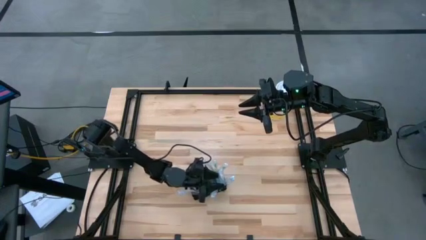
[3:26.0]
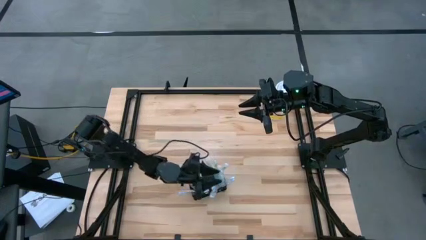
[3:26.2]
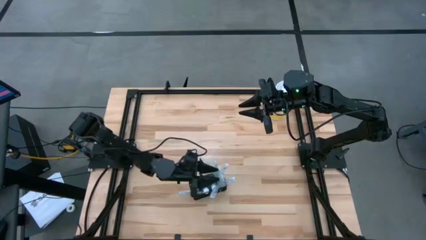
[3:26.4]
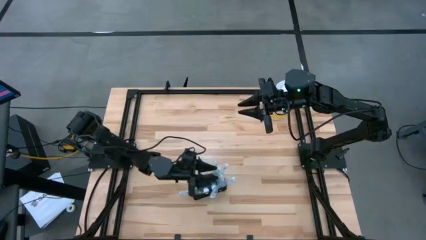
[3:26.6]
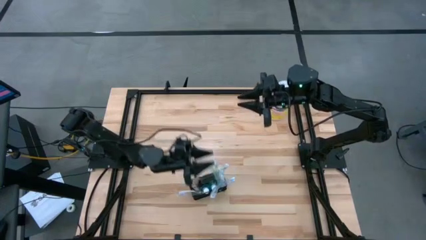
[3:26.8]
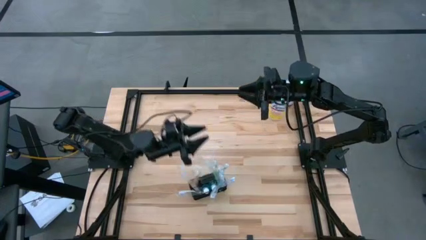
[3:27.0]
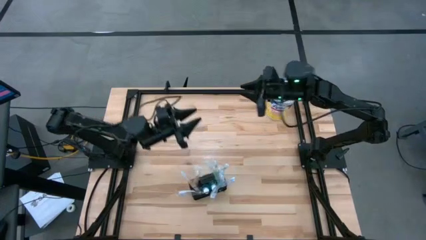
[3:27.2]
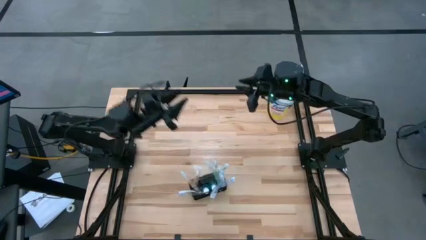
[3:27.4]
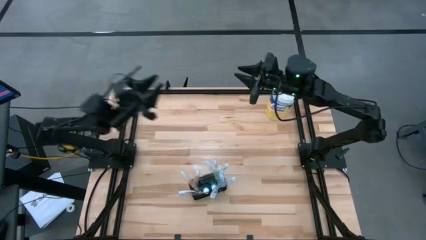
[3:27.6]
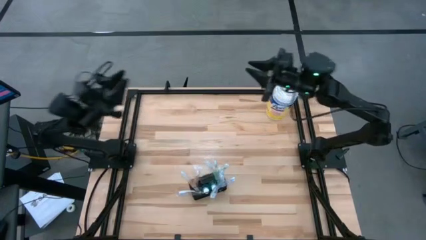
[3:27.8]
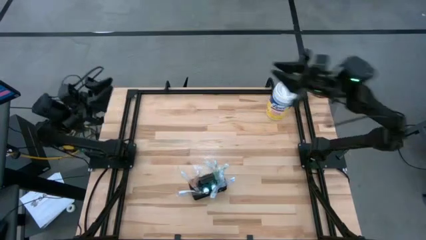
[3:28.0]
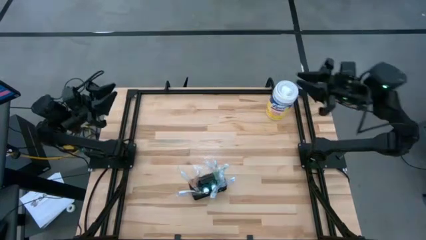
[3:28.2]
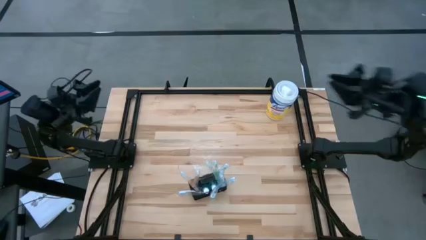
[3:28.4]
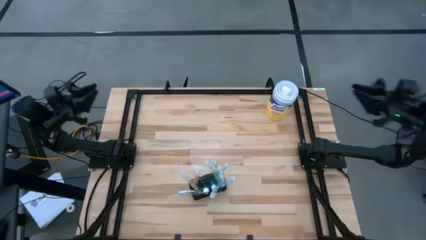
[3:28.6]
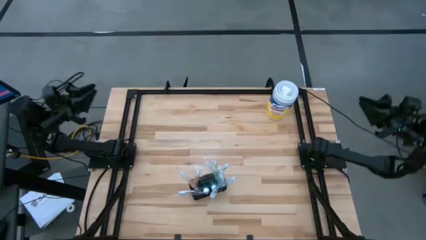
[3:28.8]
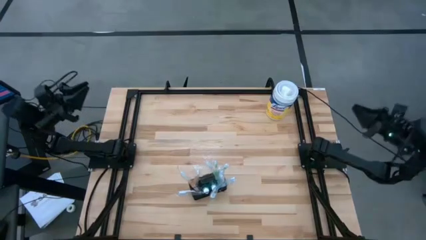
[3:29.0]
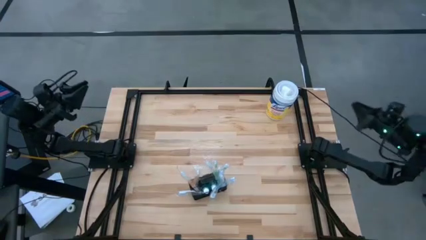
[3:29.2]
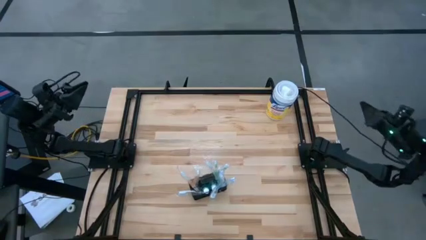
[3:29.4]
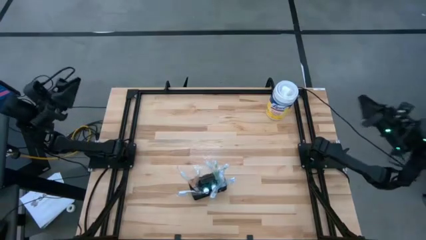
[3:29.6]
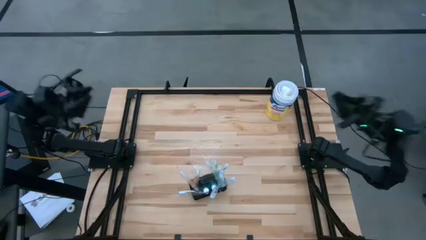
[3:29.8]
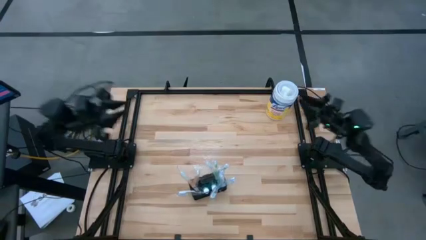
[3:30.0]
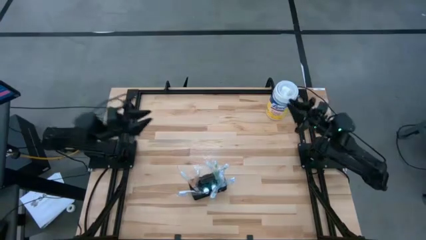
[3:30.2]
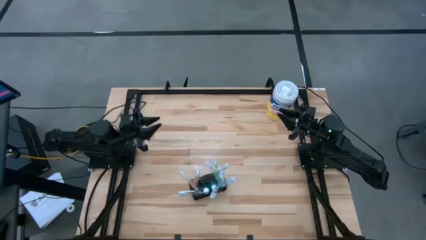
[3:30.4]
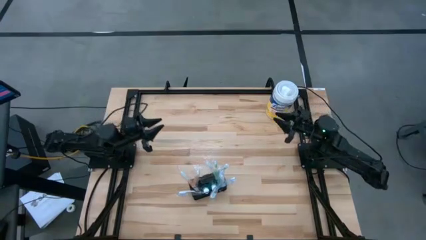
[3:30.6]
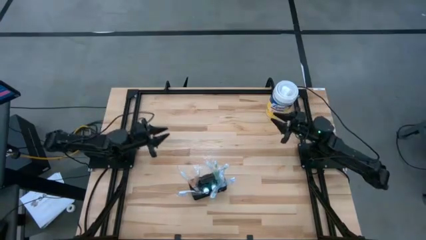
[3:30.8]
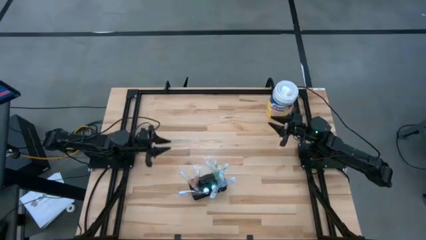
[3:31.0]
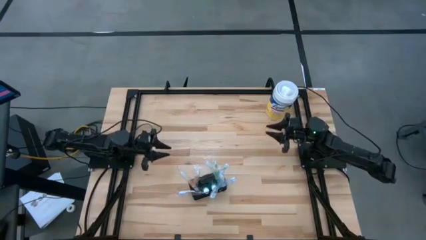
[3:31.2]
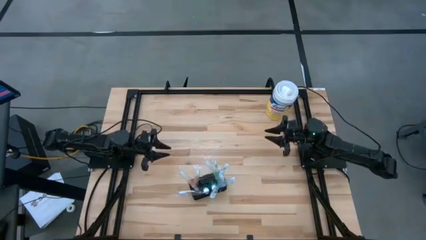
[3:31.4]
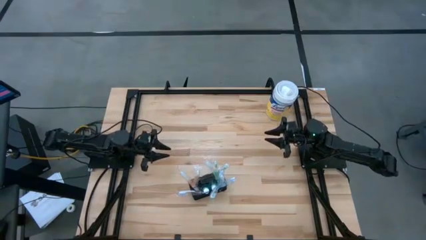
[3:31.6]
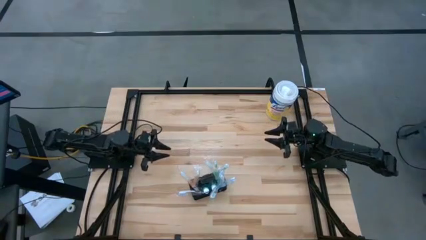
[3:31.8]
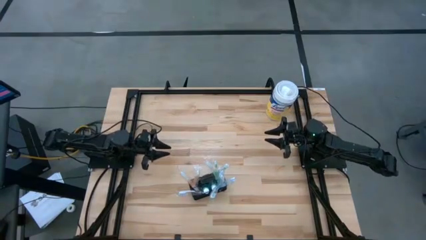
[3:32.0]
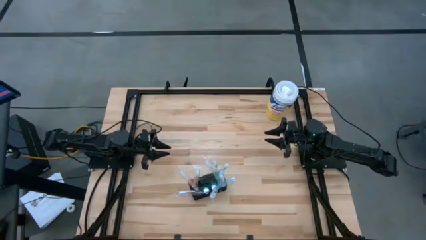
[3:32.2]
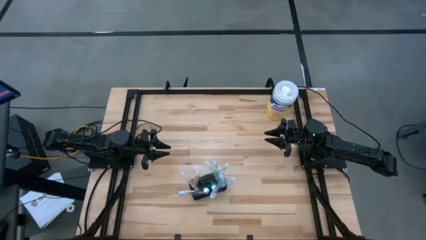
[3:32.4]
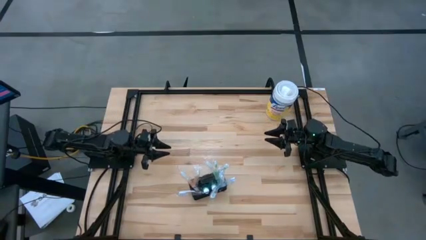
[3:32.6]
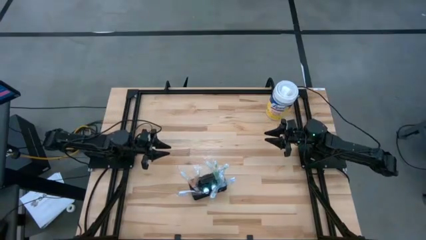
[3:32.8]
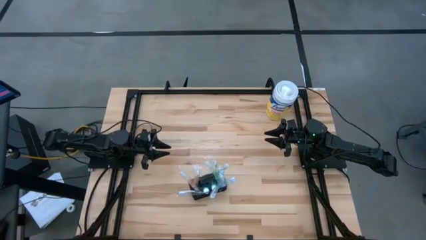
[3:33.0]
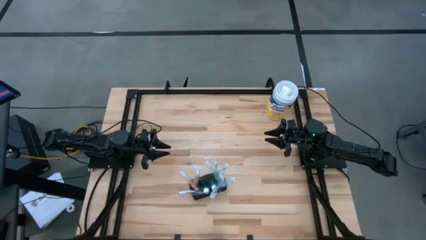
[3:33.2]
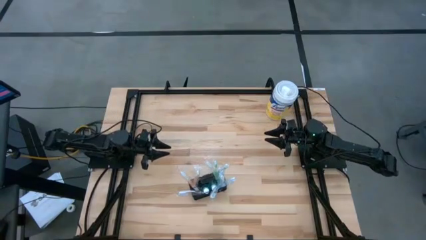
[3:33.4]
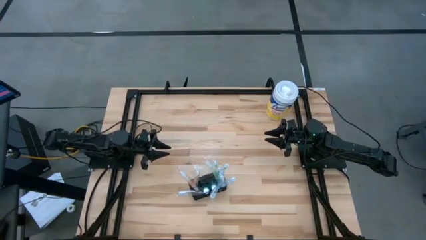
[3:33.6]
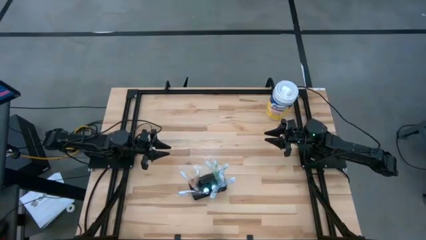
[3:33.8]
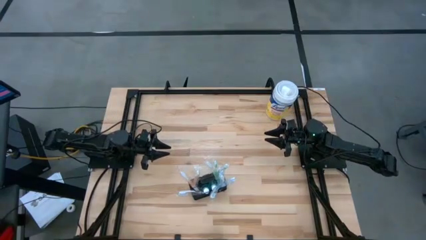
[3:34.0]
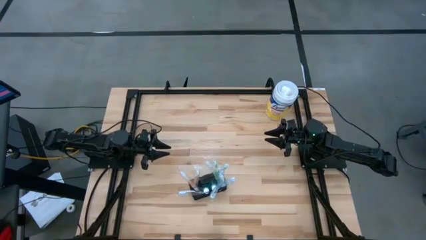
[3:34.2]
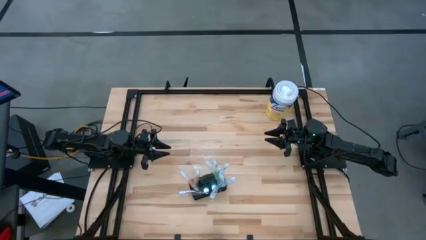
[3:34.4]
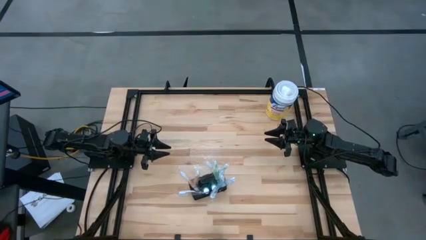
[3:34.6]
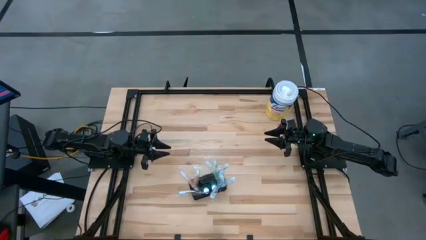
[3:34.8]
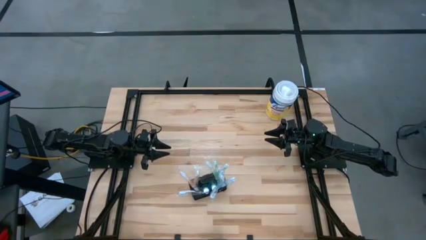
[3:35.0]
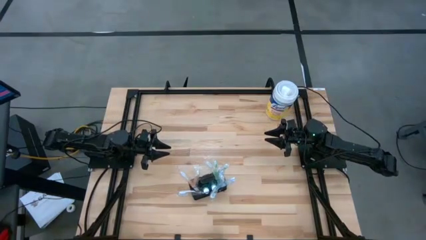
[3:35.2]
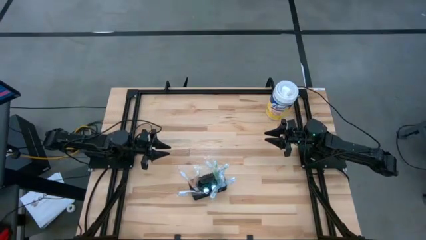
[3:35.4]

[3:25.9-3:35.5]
Task: Pick & Place toothbrushing station
Return to Home Position

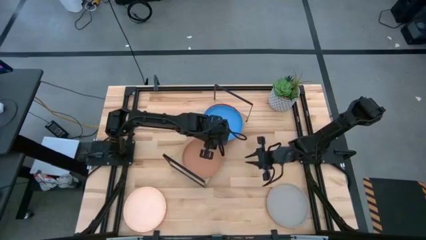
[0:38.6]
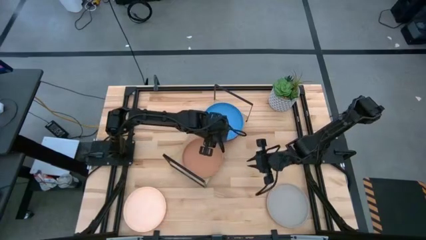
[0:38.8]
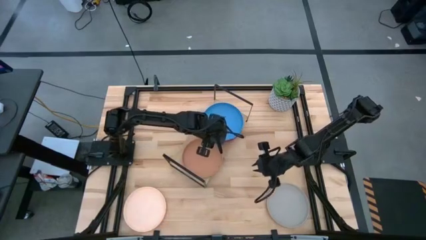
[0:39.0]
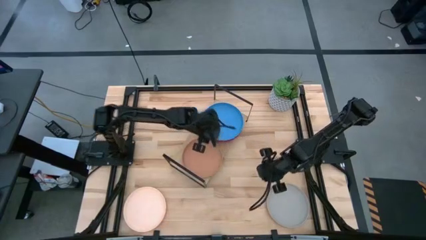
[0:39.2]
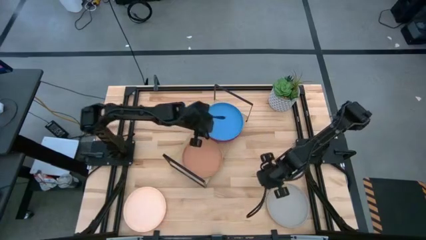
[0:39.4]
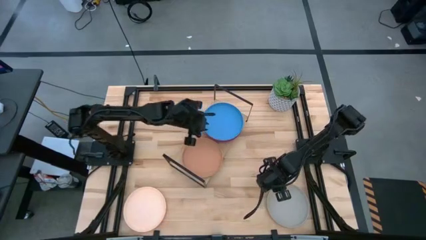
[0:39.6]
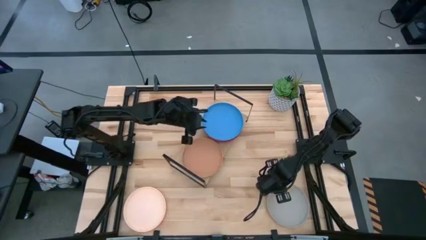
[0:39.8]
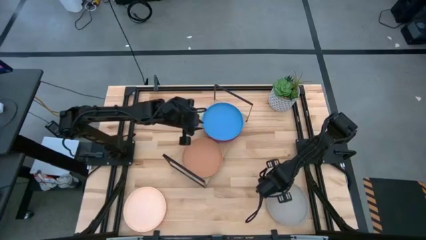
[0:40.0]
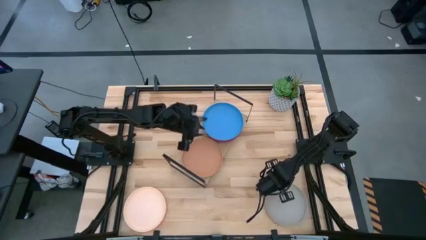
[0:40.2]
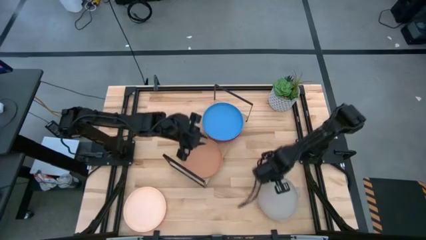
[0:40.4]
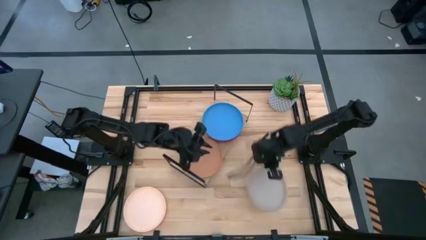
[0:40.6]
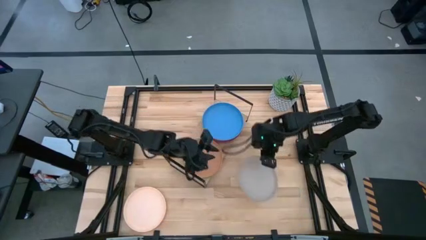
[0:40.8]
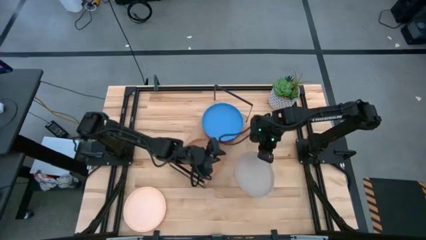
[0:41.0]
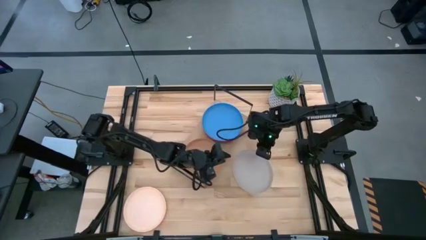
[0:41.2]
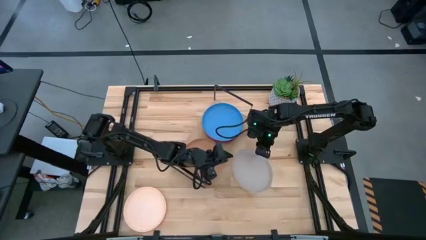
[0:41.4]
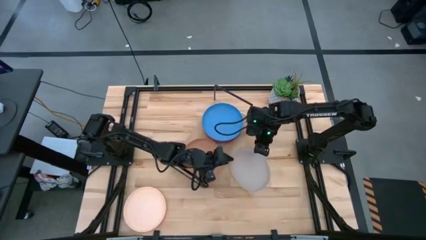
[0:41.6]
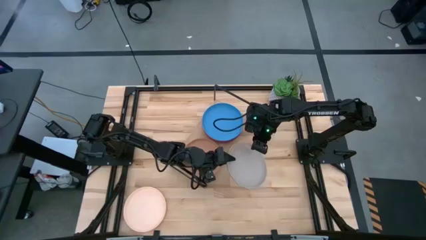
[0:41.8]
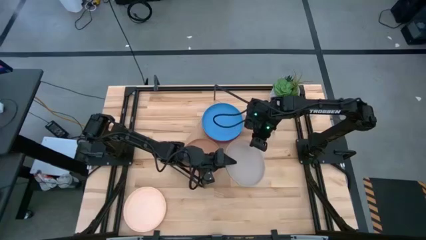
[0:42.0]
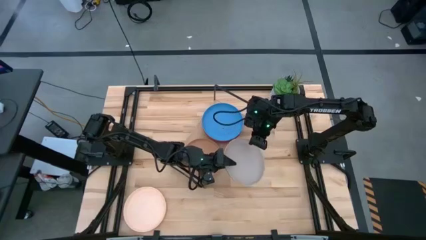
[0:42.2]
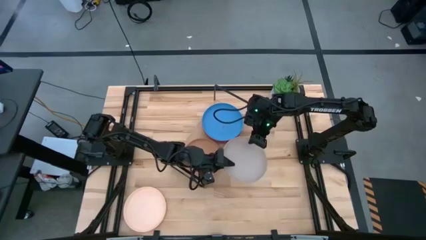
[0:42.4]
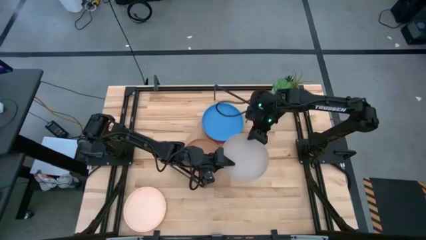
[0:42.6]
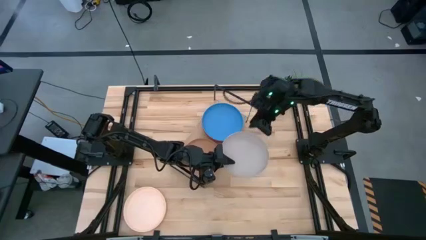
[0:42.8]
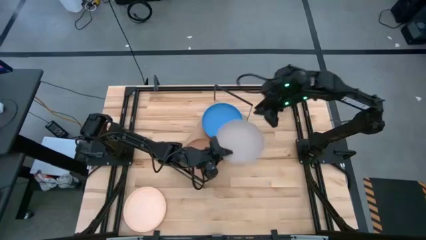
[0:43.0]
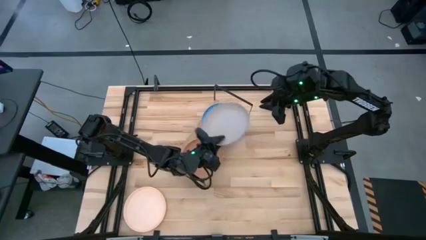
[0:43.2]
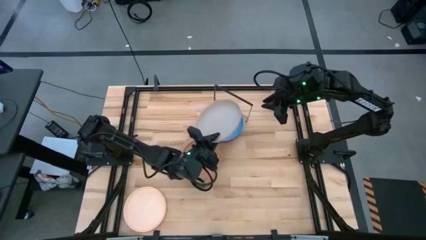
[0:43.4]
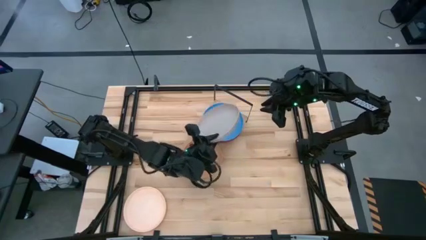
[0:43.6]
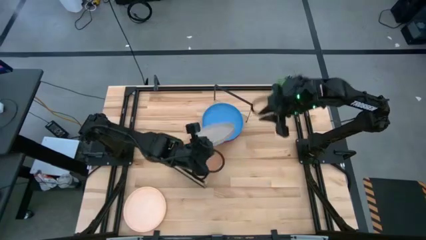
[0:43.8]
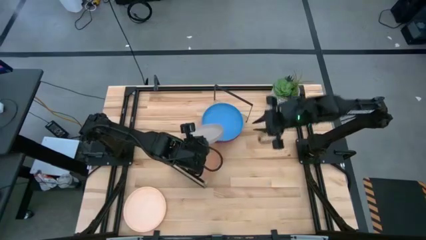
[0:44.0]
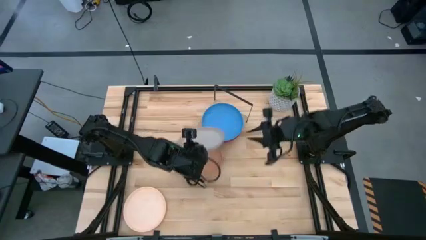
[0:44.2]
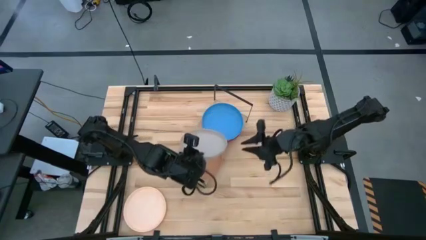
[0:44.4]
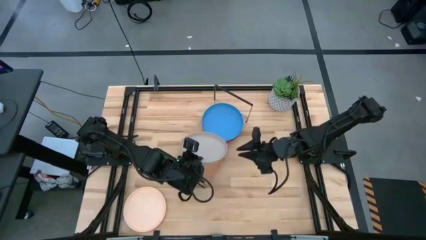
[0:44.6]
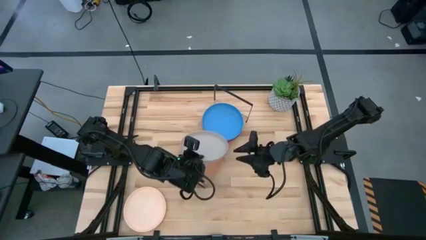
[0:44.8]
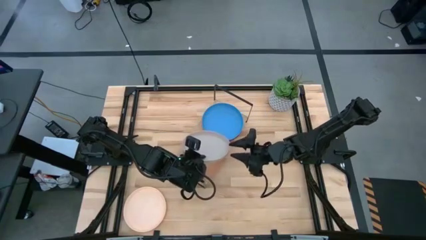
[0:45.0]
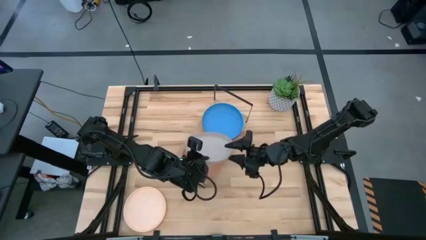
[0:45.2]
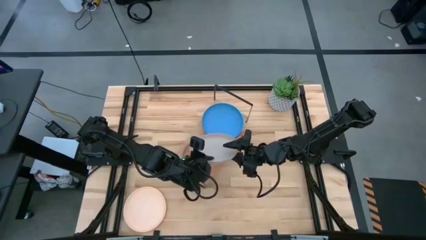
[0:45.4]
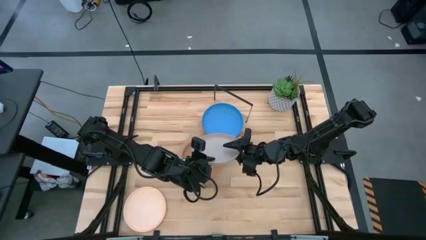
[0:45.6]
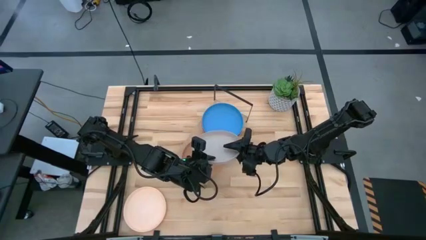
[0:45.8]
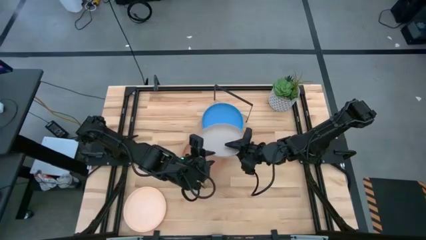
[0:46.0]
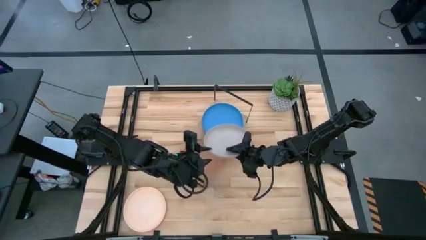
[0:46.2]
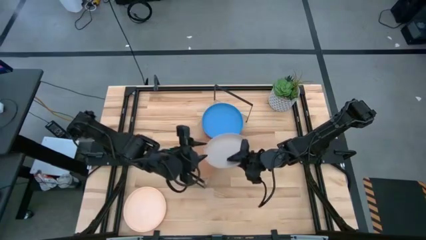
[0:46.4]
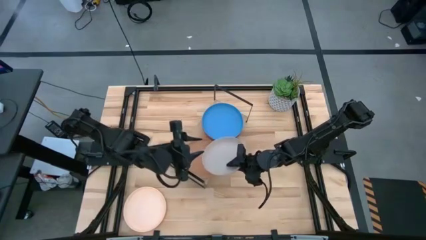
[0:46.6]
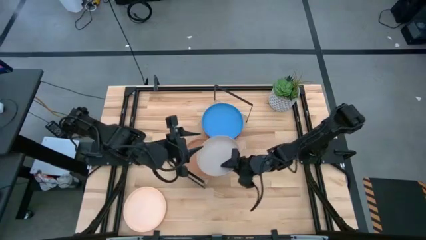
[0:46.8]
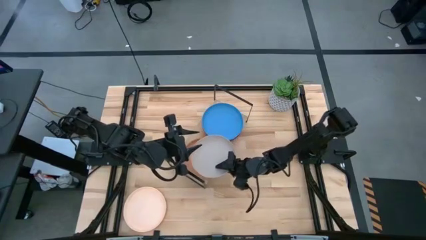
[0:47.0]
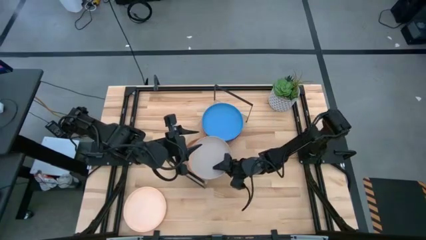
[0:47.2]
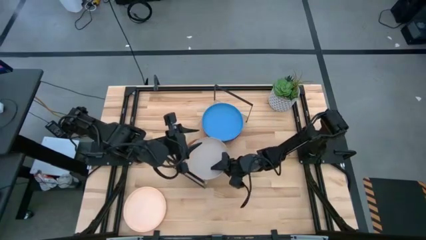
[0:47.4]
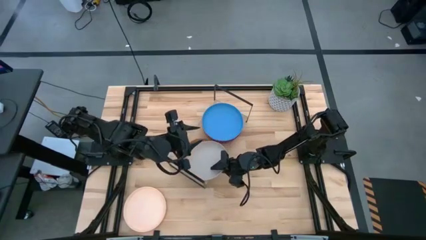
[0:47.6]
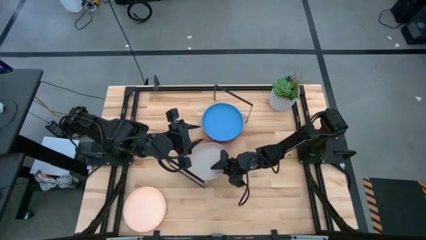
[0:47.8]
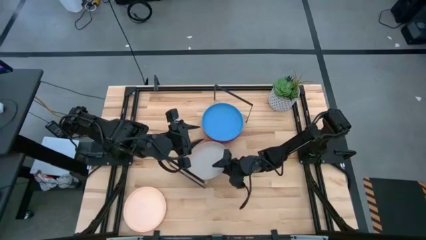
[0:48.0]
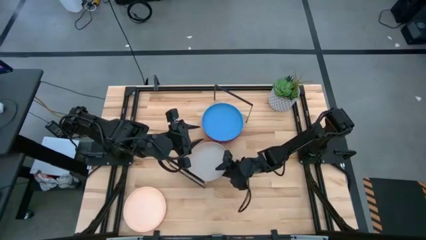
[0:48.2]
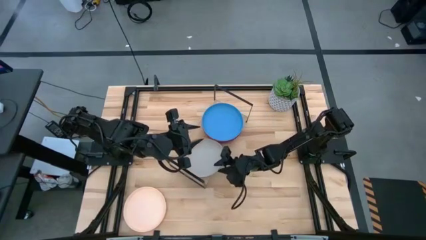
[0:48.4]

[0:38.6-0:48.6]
Task: Place and stack plates onto a shelf
Stack the gray plate on top of the brown plate
